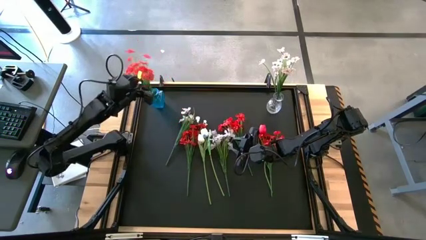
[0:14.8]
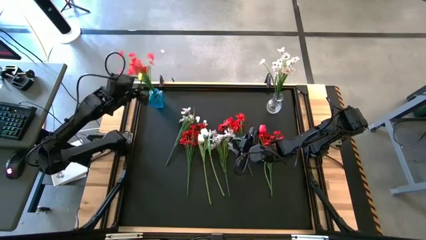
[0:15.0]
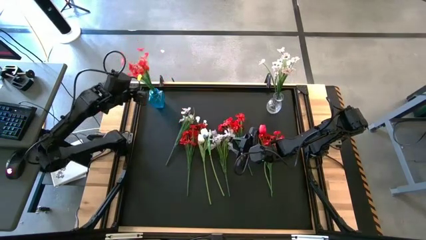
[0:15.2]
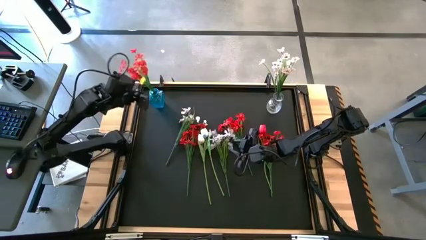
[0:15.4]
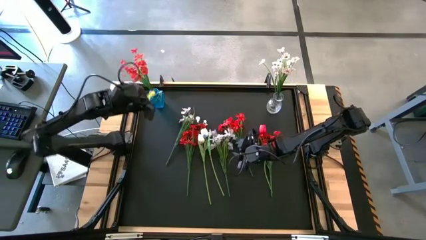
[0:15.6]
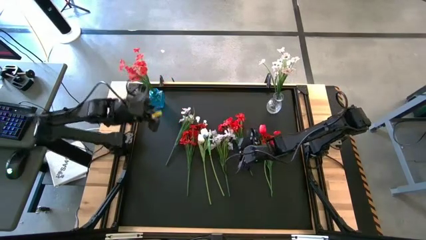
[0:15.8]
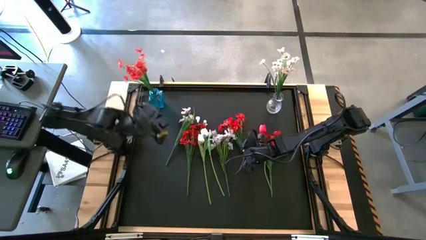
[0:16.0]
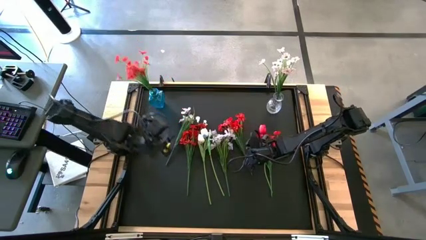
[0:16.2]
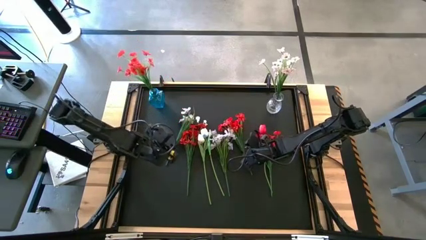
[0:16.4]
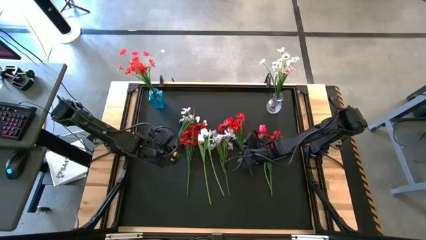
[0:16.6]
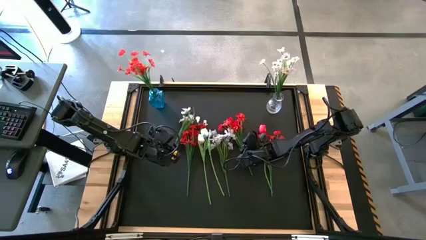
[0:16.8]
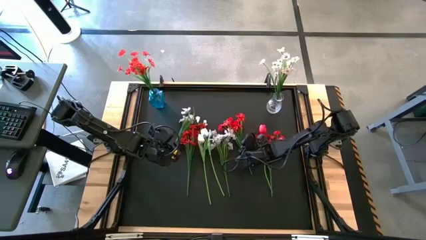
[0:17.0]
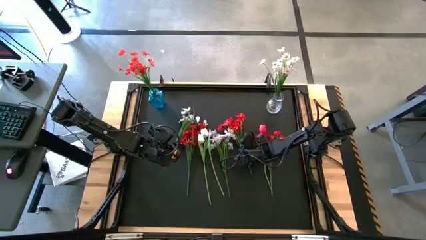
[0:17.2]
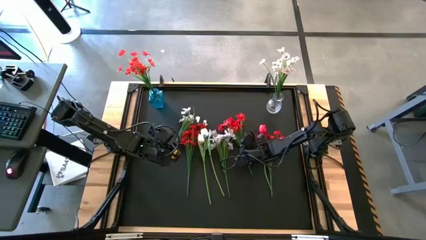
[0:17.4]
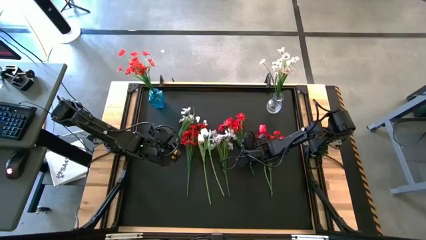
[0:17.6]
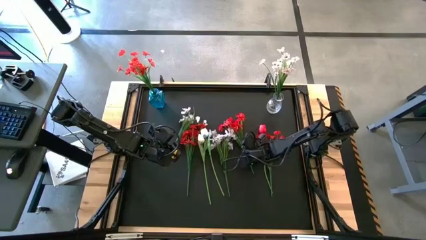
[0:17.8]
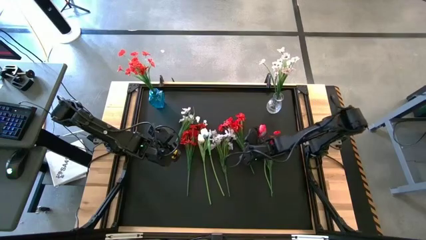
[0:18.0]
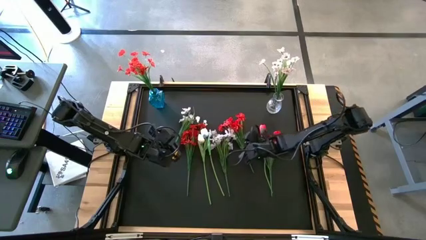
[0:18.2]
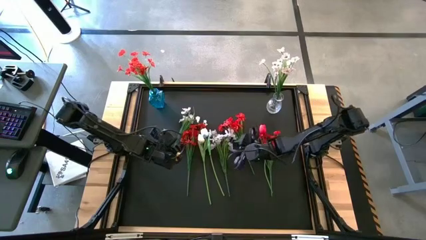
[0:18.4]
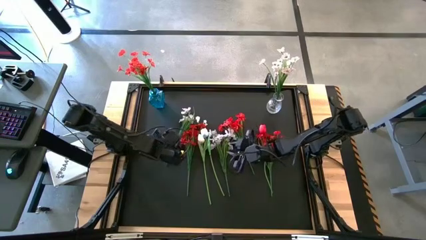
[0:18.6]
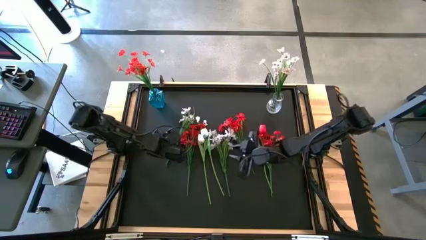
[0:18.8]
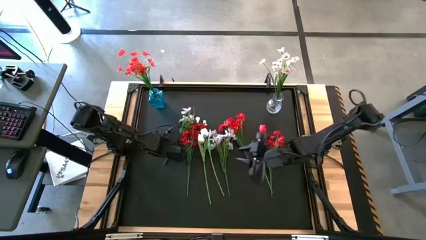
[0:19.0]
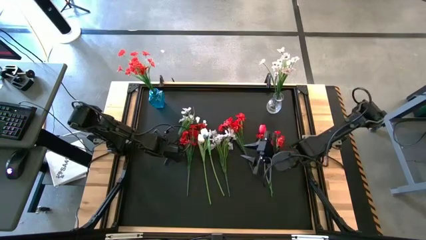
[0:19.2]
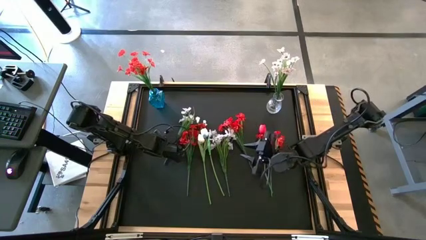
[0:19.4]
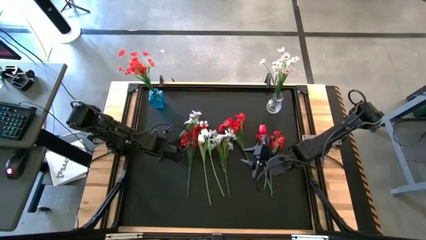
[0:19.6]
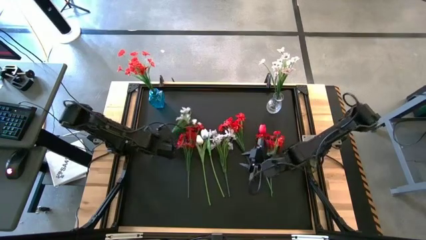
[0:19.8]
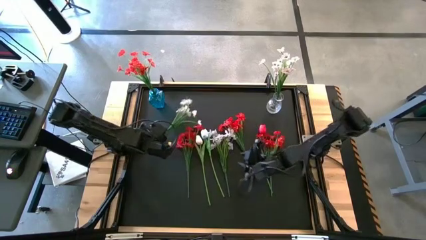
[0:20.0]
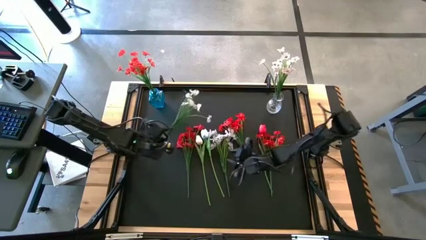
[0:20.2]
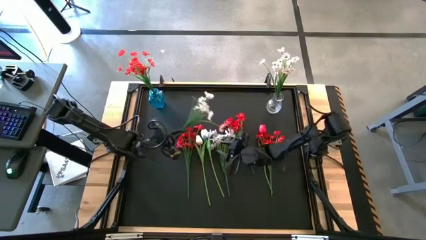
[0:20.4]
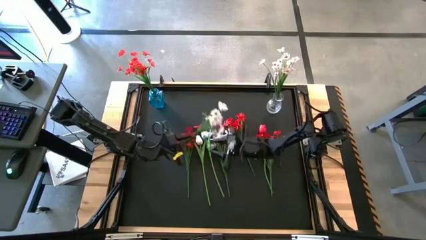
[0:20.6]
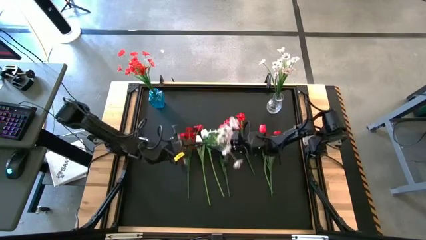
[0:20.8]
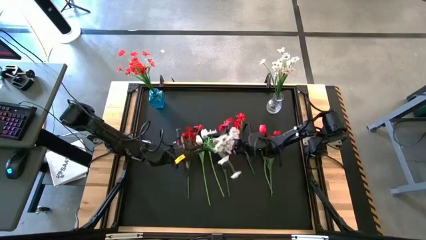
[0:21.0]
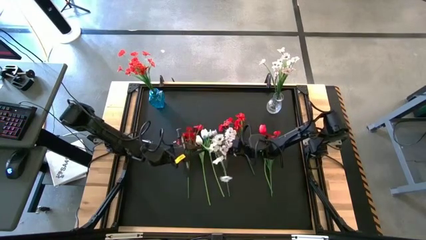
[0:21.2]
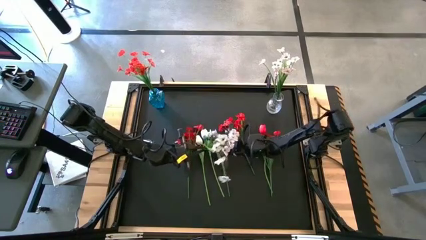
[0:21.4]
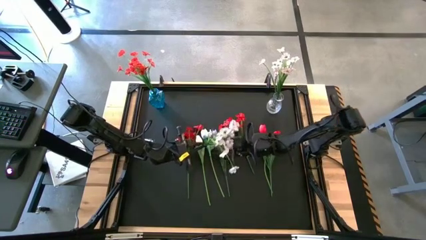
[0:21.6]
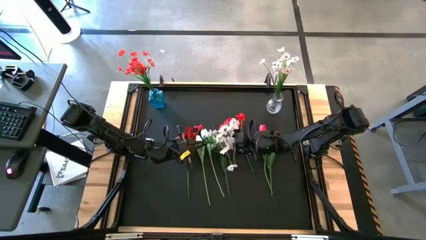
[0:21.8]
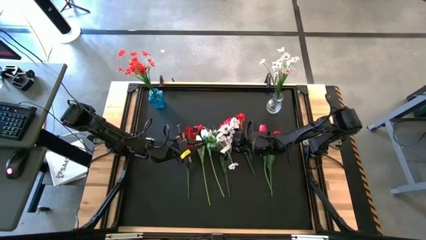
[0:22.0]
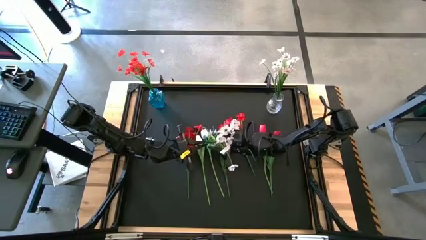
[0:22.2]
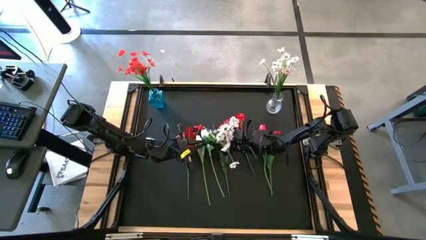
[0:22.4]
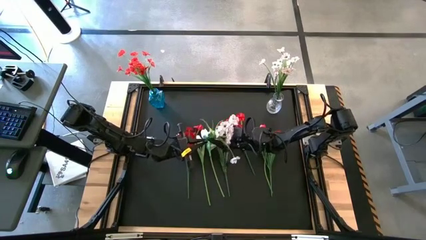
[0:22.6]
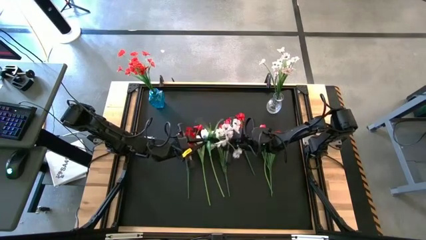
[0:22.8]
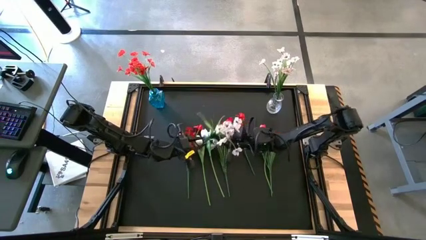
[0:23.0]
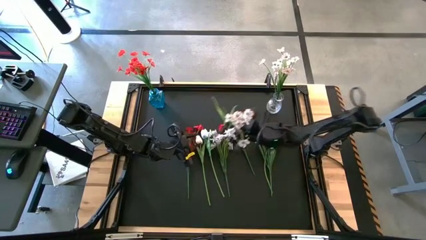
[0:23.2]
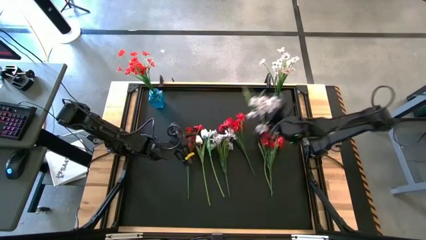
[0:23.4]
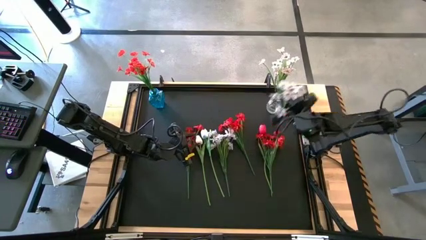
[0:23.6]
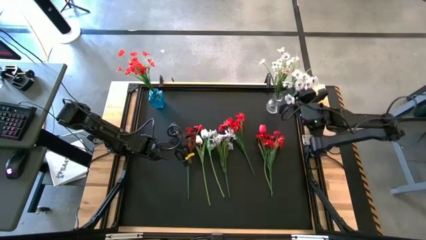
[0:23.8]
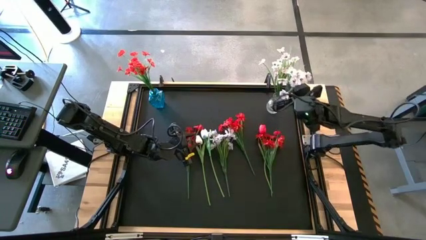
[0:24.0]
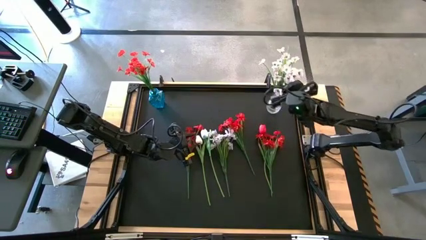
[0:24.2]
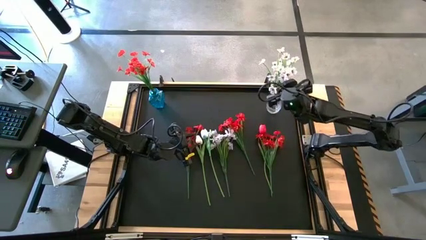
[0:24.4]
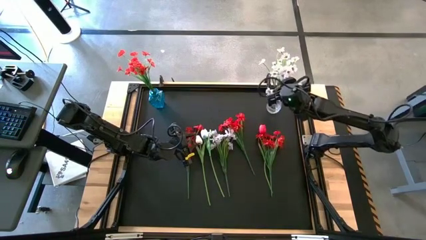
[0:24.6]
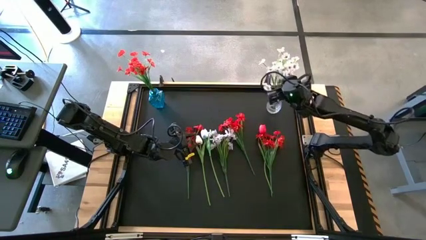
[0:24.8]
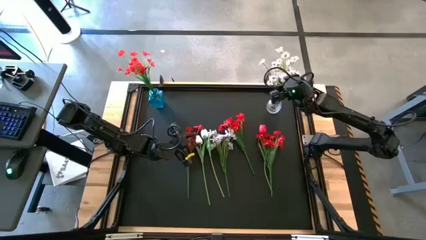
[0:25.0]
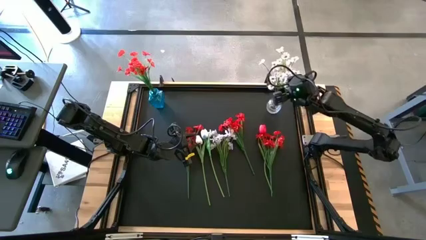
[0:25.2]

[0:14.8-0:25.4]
Task: Sort flowers into vase by color
Put the white orchid into the transparent vase

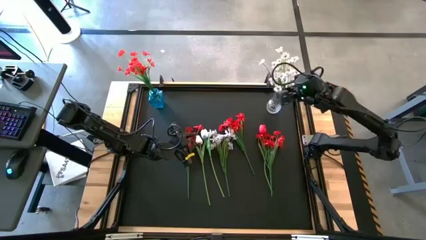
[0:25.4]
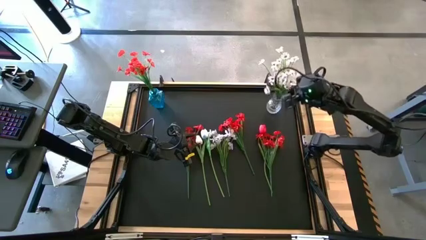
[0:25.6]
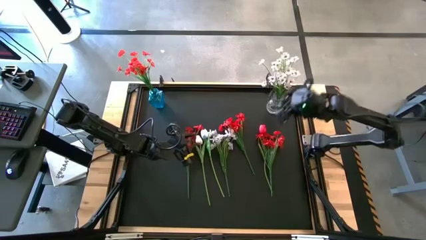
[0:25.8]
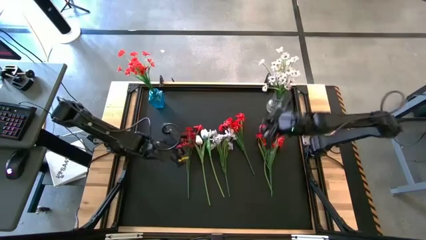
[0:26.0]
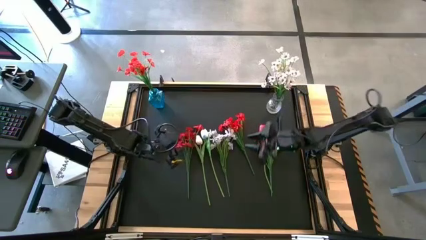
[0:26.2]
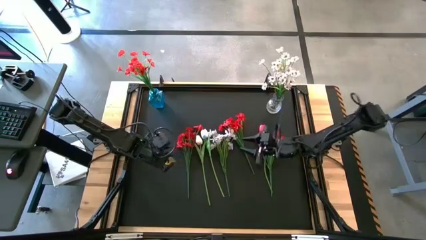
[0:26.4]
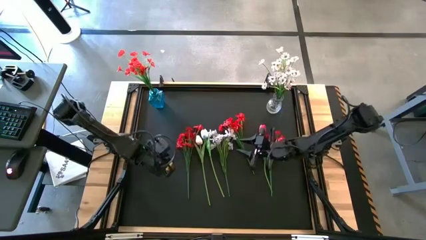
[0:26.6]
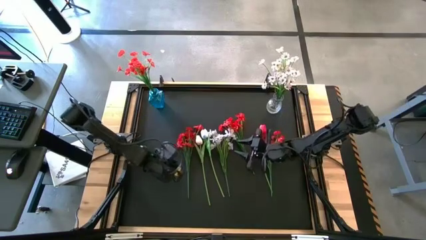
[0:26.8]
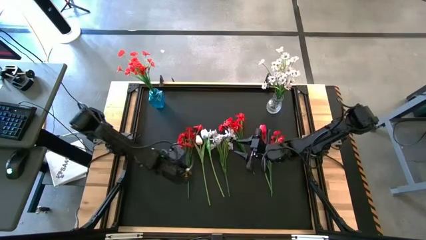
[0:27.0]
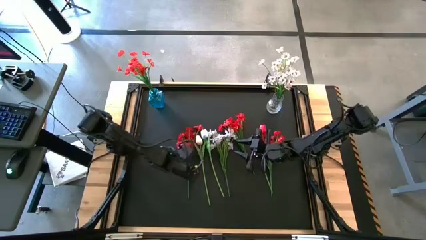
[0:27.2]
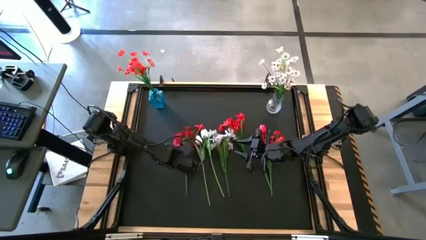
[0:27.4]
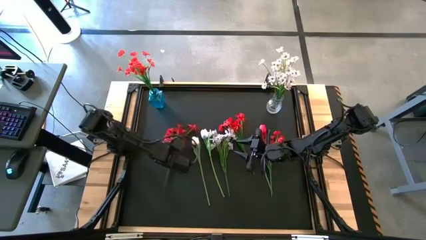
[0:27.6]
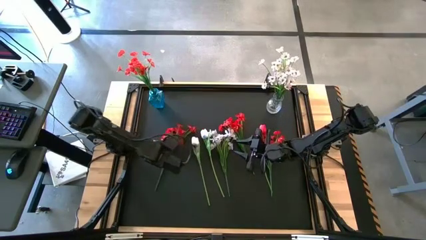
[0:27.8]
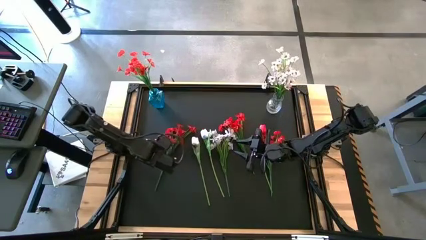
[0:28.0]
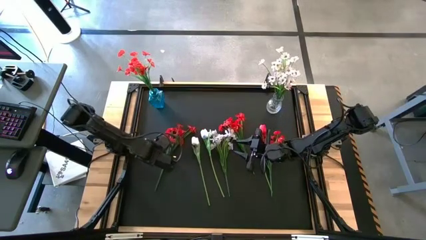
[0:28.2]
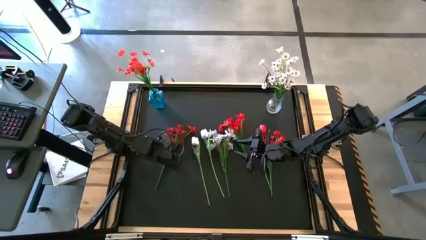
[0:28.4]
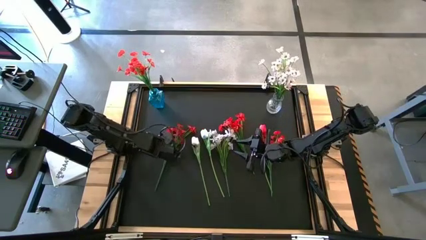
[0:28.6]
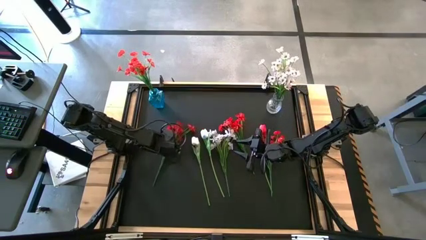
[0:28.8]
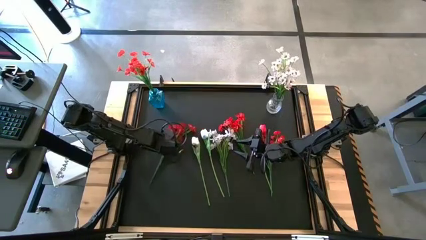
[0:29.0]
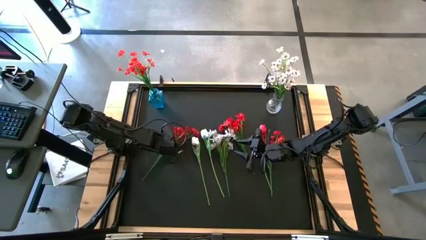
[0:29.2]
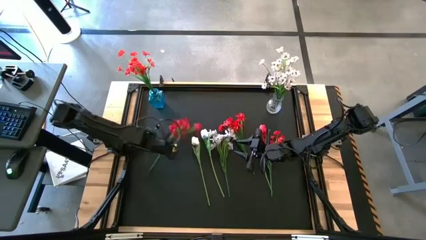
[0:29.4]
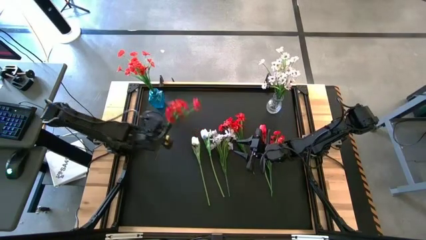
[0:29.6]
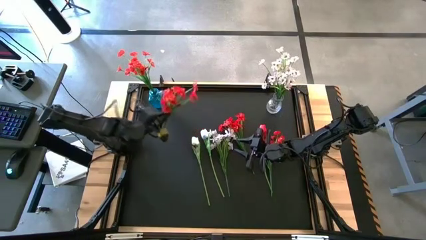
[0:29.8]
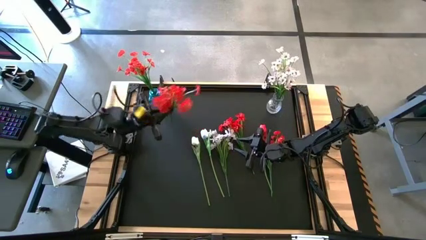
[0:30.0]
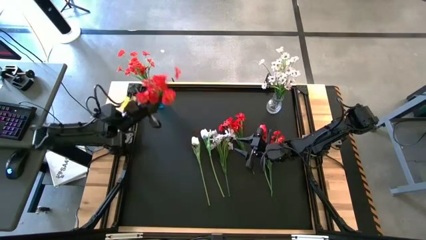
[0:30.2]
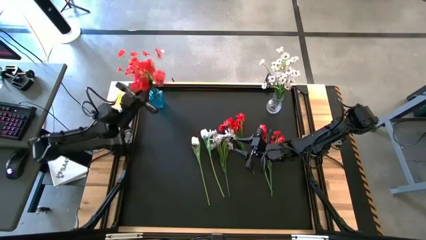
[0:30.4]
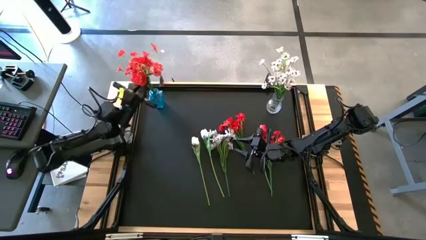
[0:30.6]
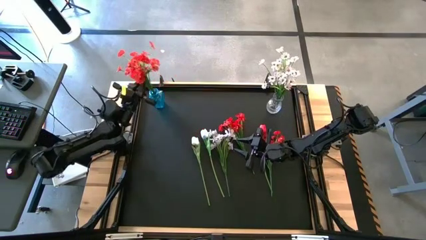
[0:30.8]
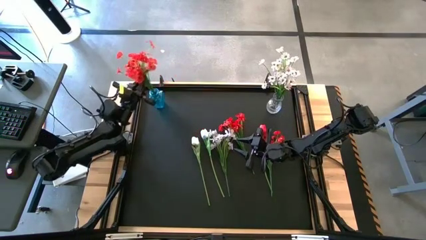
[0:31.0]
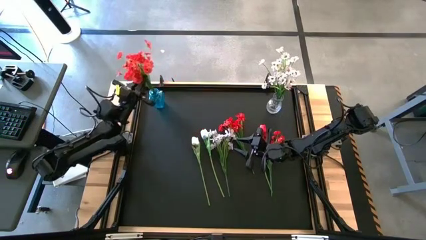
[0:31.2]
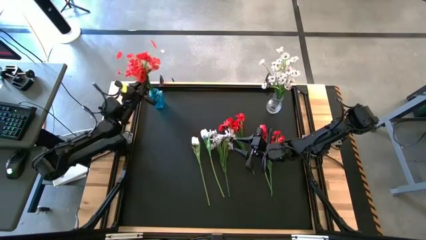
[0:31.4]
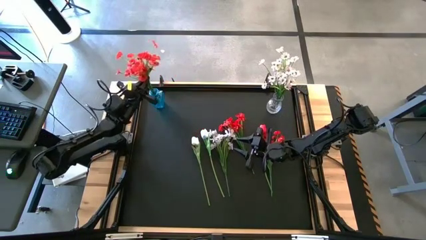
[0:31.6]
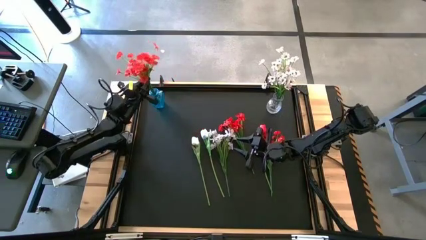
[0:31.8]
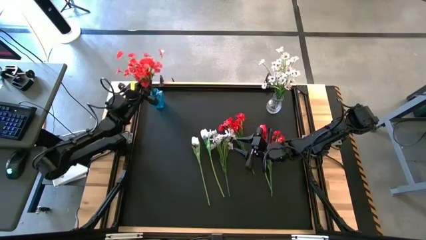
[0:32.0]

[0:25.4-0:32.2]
Put the orange orchid into the blue vase
